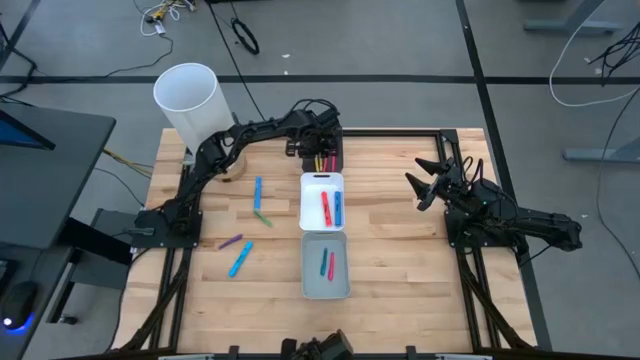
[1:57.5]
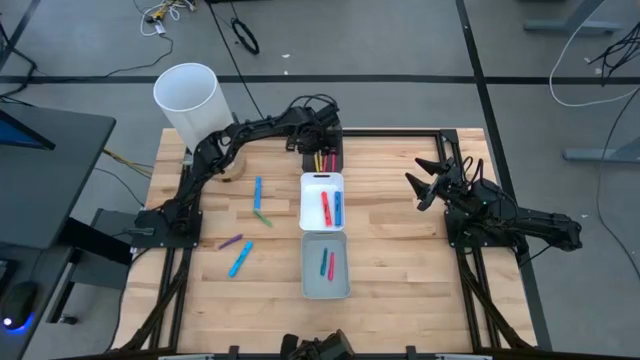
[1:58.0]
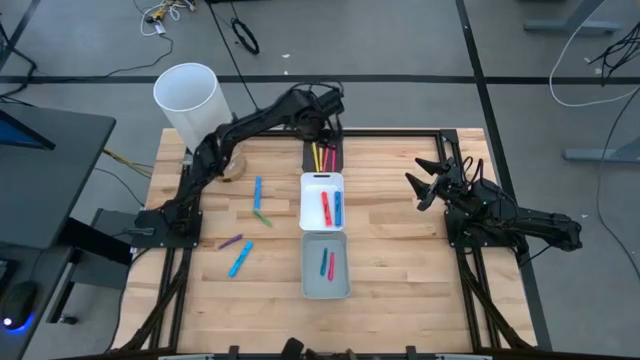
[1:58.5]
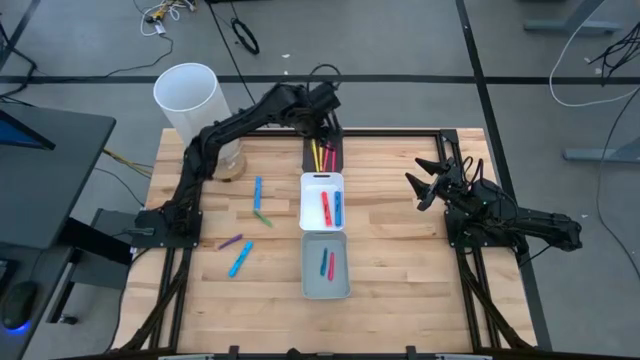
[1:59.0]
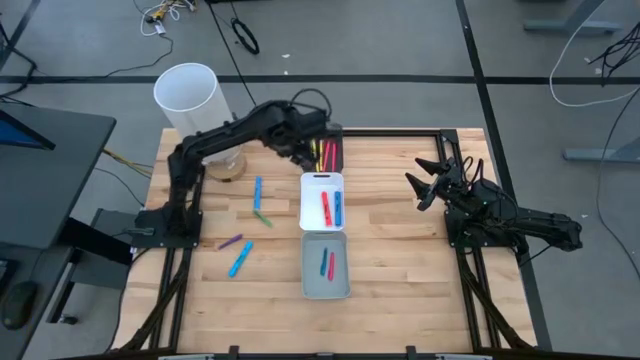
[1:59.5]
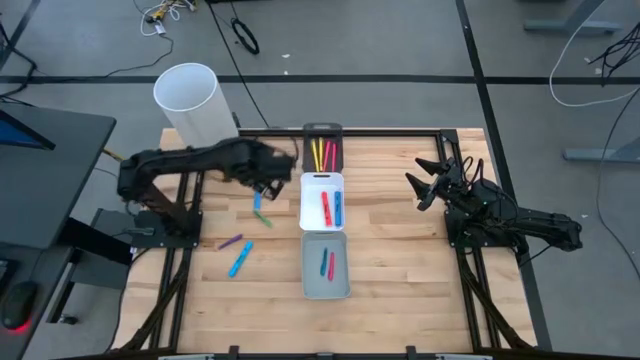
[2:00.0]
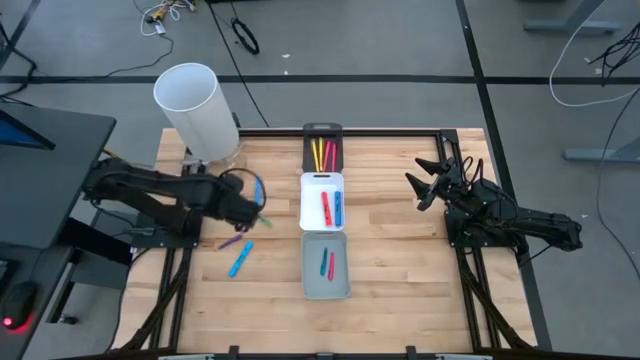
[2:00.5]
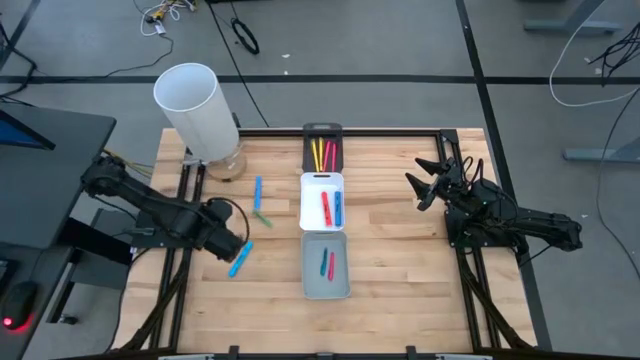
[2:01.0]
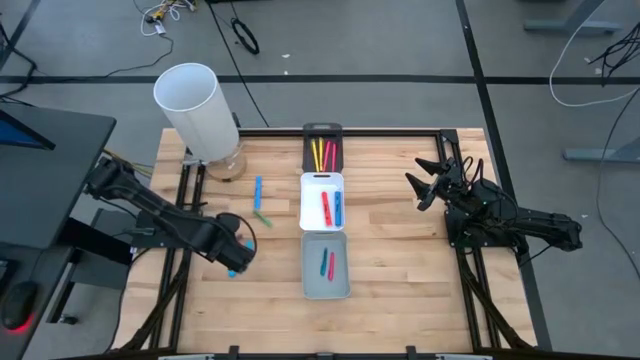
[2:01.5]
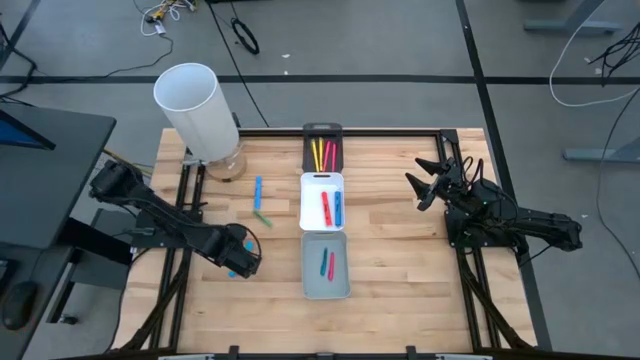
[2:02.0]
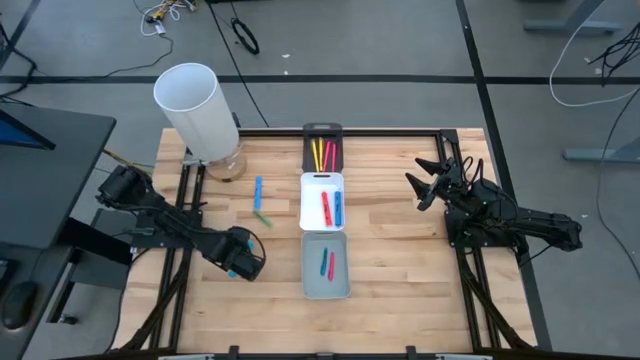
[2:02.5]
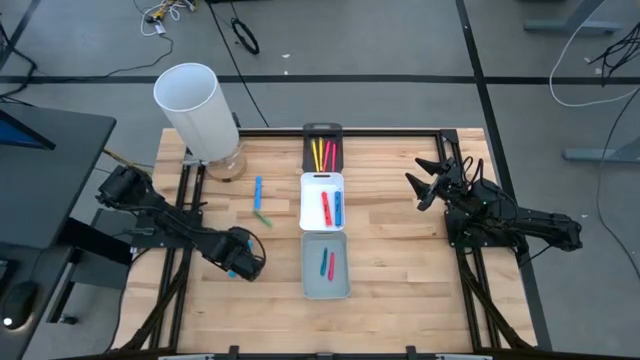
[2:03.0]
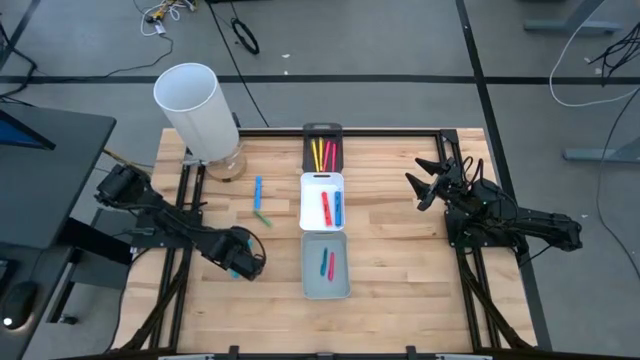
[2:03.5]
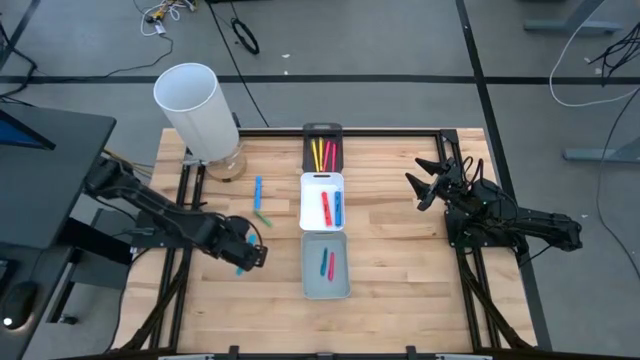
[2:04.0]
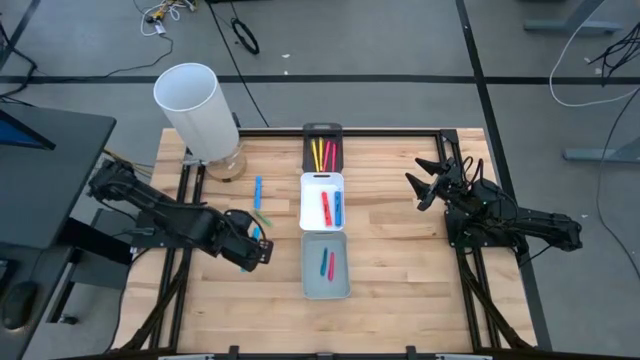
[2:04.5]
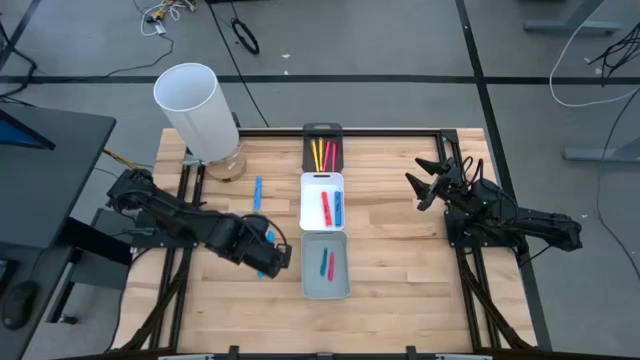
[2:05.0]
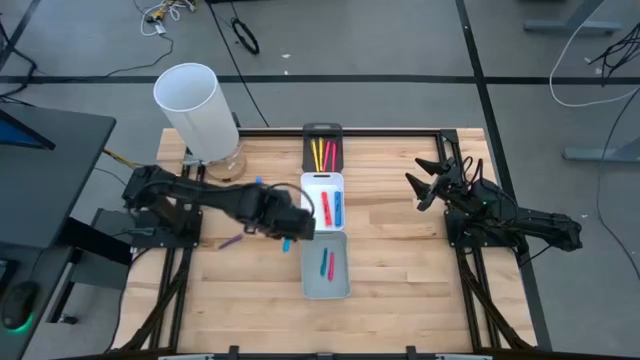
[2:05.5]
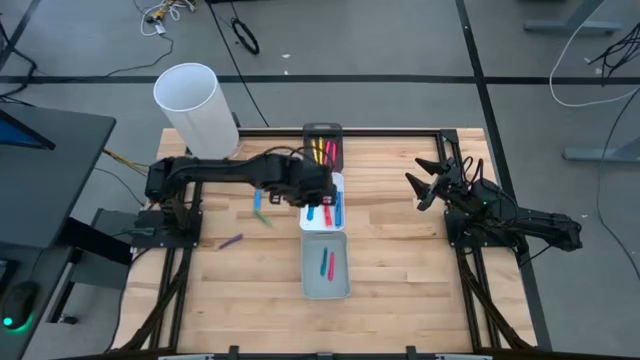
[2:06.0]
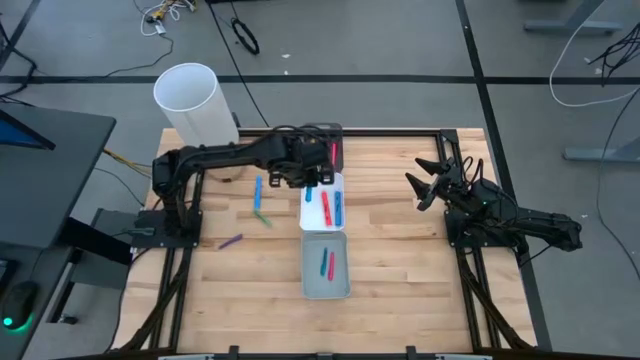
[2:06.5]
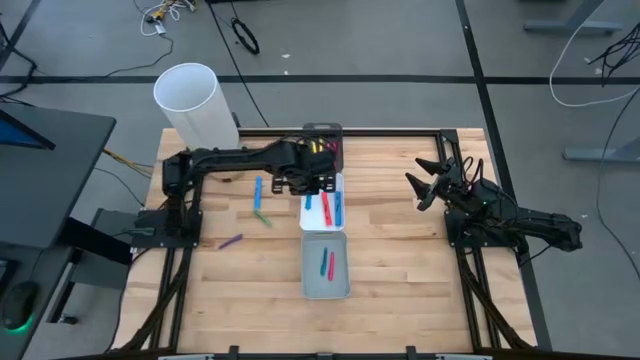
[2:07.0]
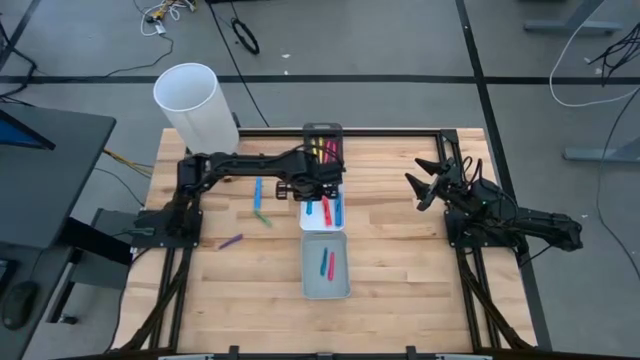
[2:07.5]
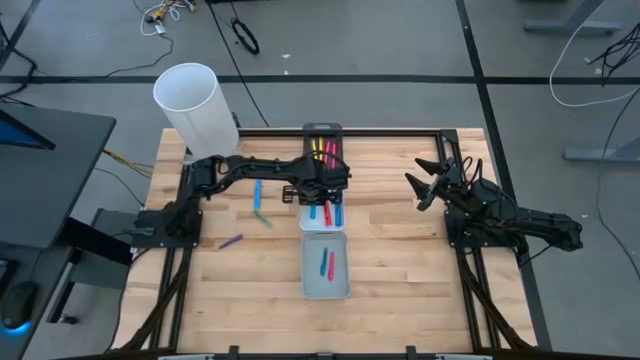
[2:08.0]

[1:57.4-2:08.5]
Task: Pick & Place Markers
Put the blue highlighter pen into the white bin

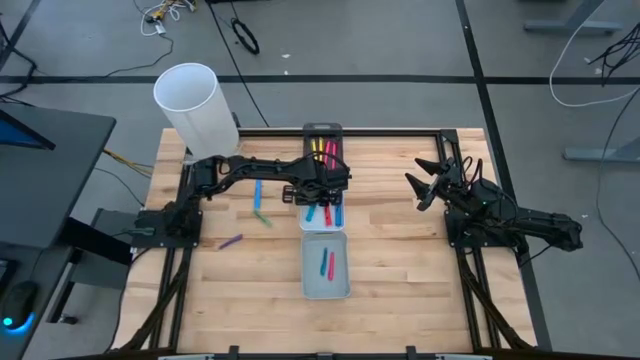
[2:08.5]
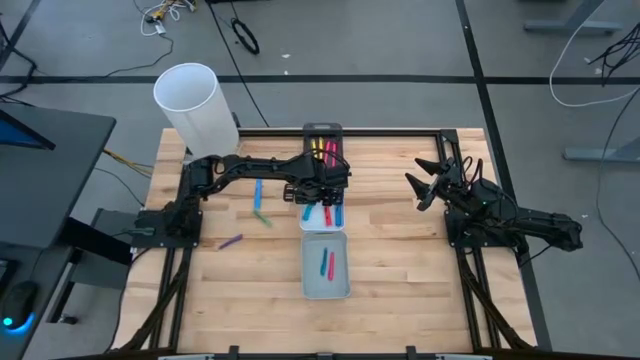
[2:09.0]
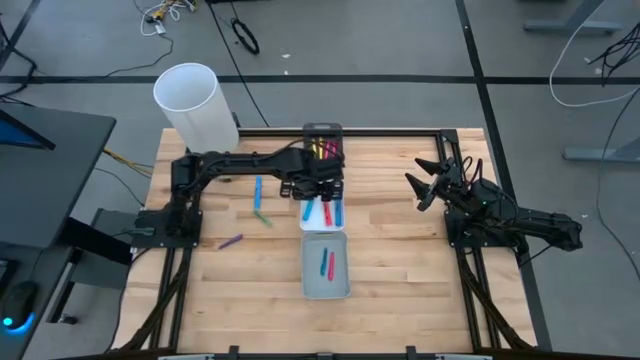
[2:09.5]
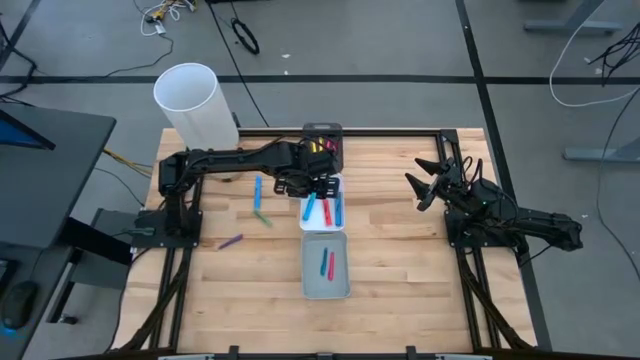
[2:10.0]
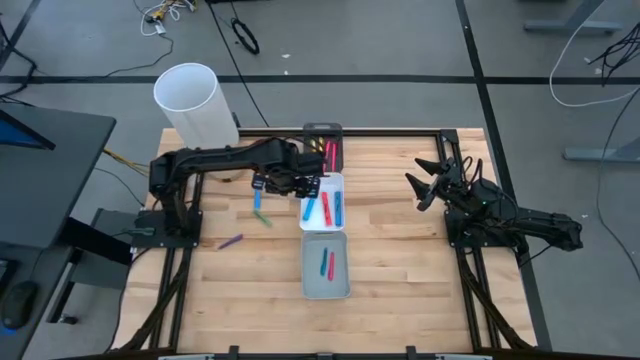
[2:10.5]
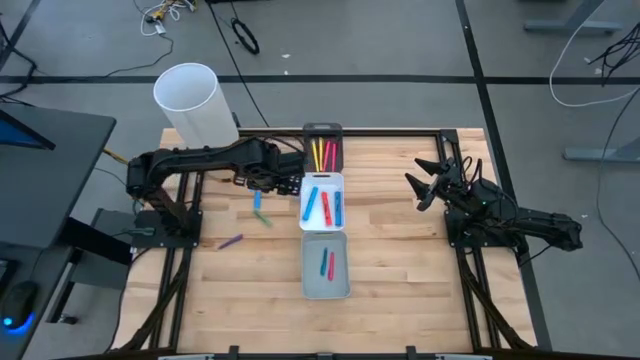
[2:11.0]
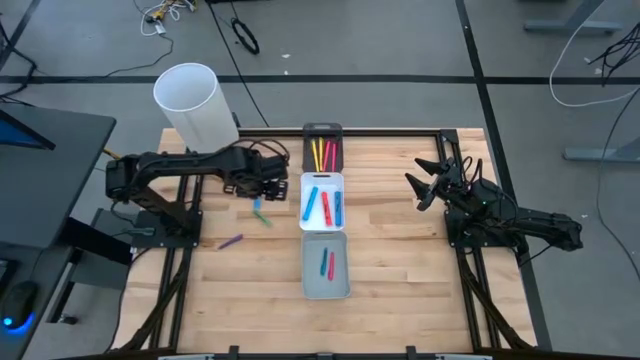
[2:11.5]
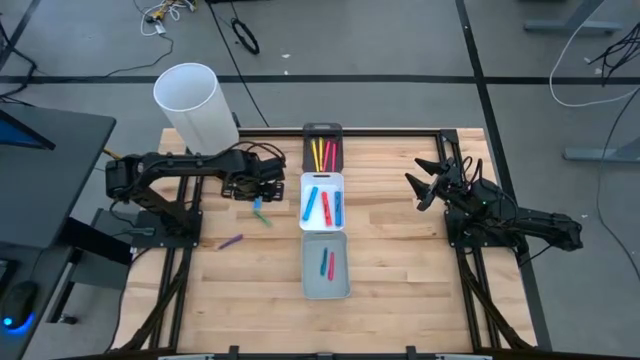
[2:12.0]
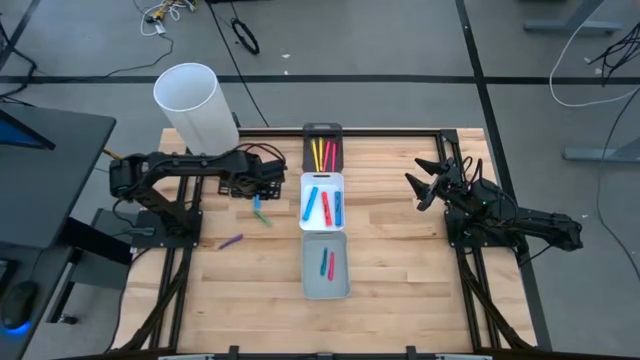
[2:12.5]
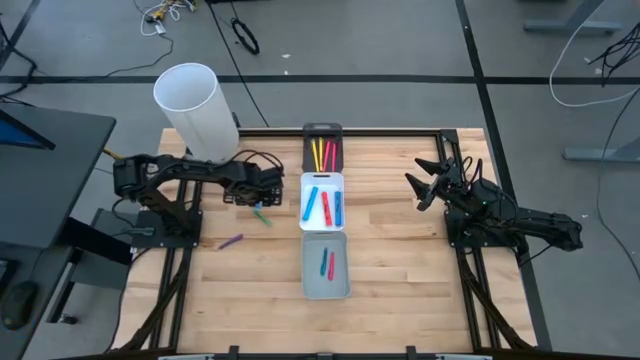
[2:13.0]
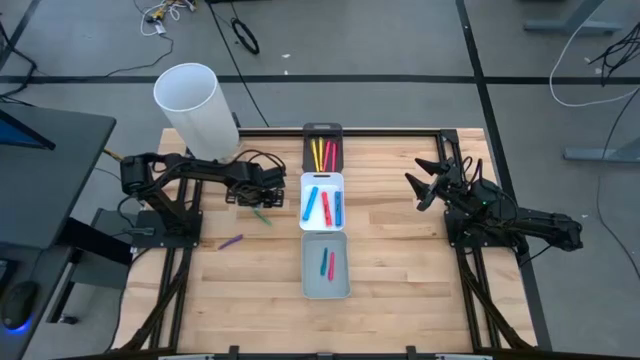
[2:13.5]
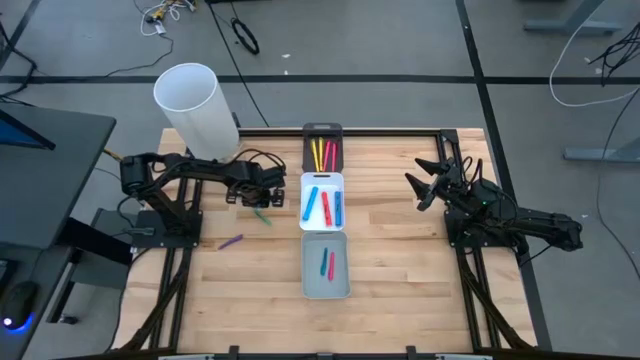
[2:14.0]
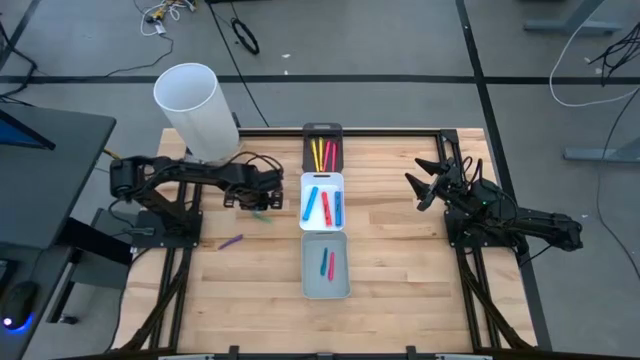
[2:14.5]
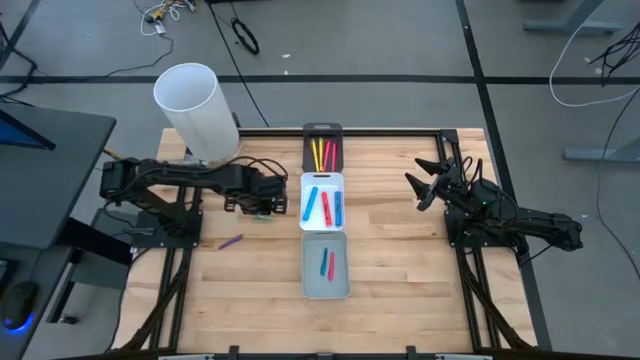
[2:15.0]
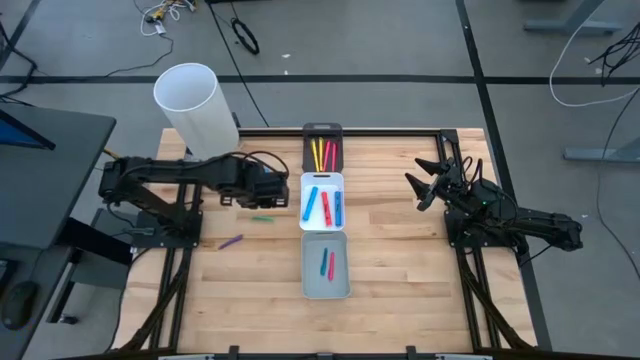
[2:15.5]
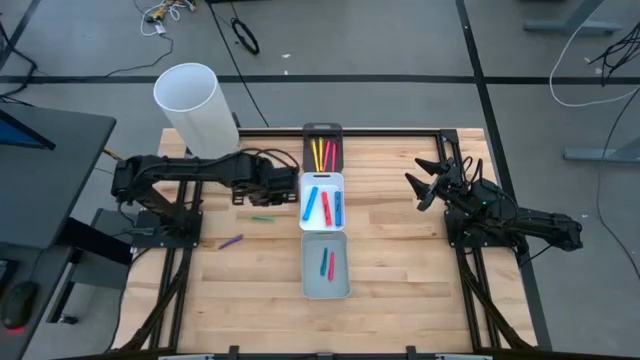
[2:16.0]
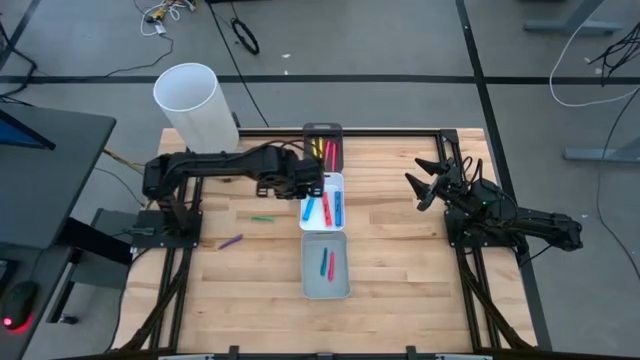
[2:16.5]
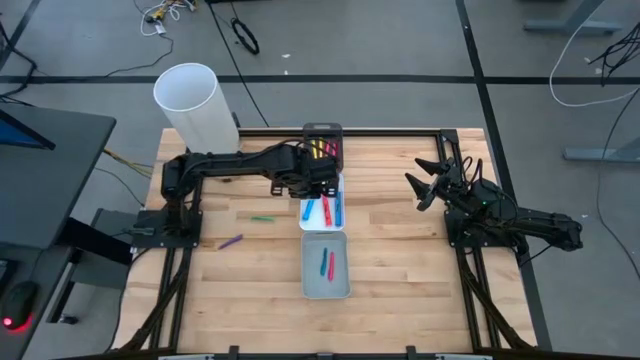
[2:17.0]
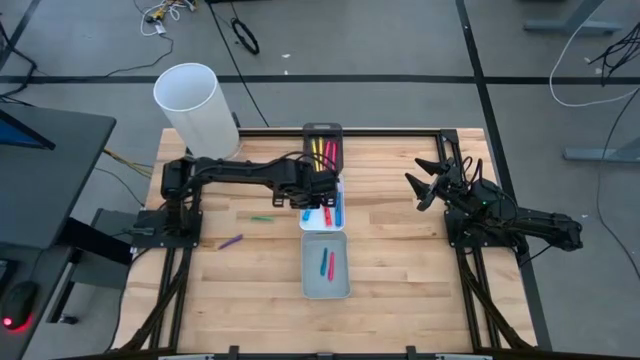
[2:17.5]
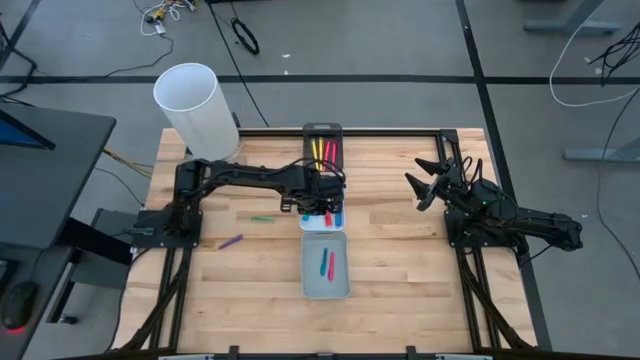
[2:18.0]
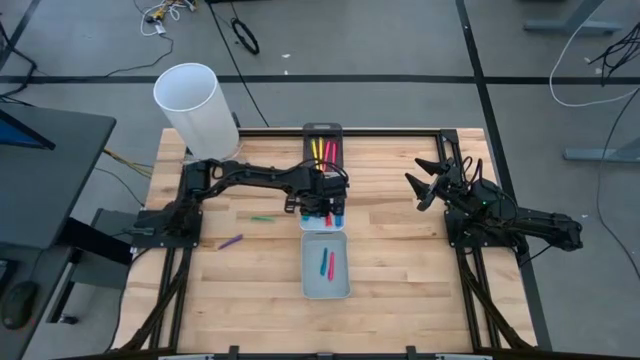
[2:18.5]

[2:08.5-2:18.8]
Put the blue highlighter pen into the white bin
